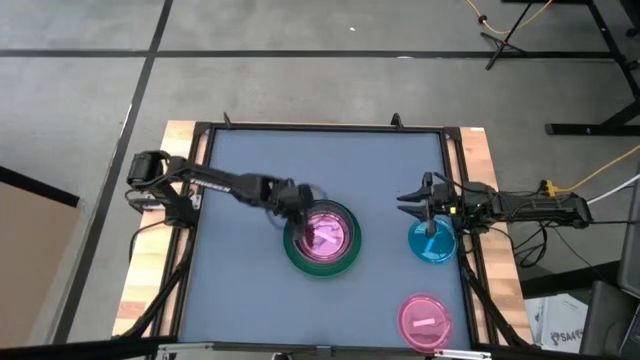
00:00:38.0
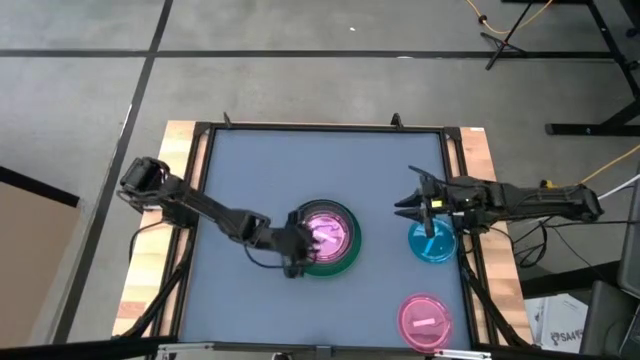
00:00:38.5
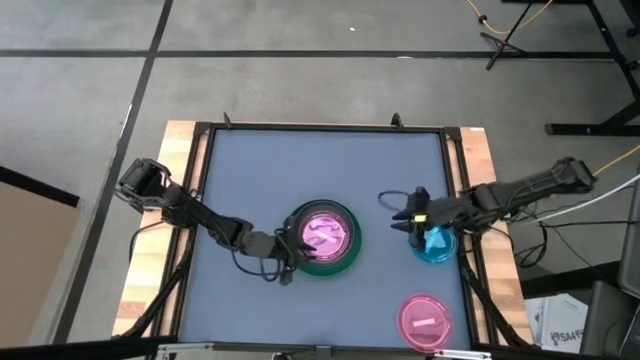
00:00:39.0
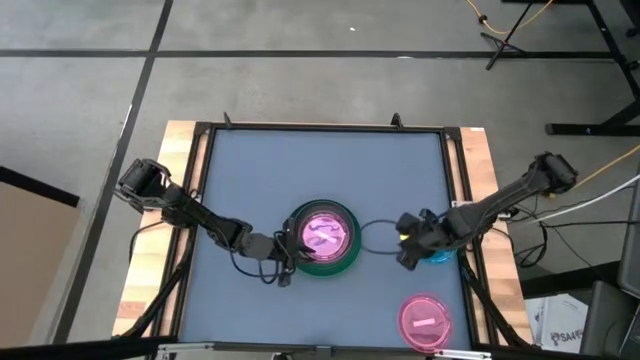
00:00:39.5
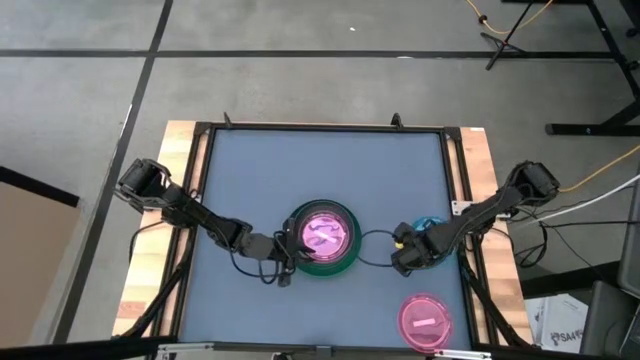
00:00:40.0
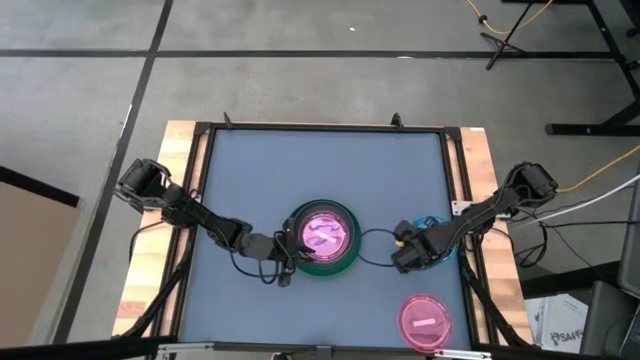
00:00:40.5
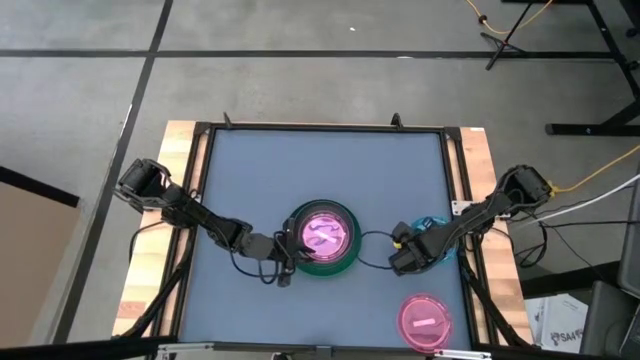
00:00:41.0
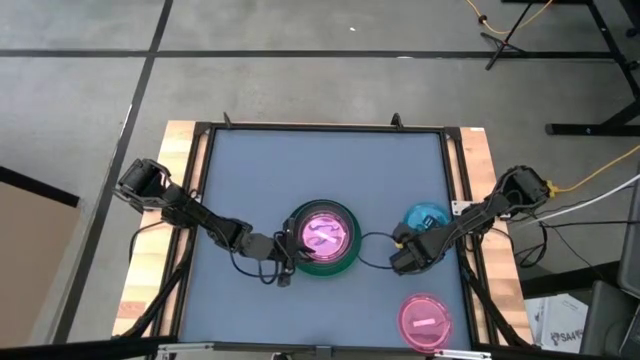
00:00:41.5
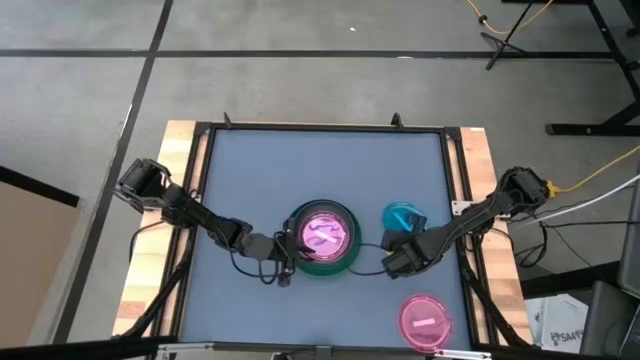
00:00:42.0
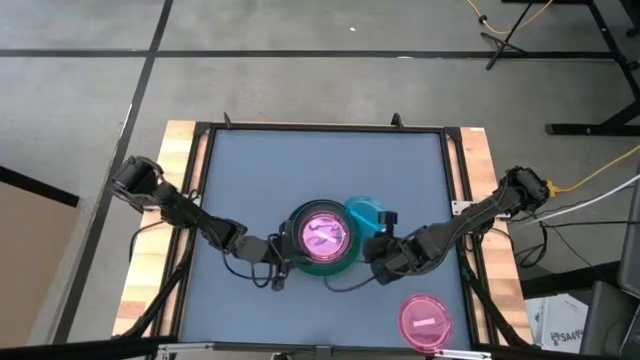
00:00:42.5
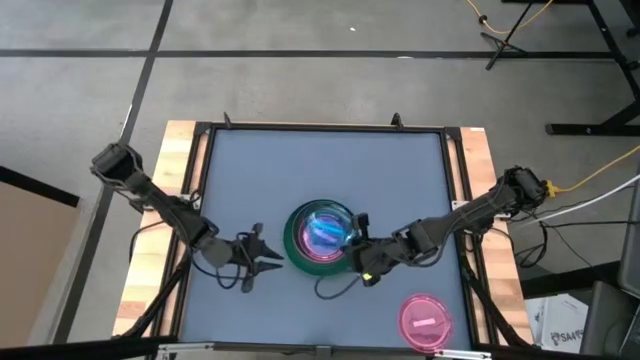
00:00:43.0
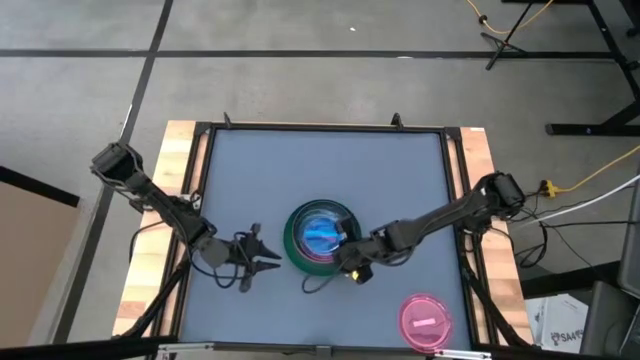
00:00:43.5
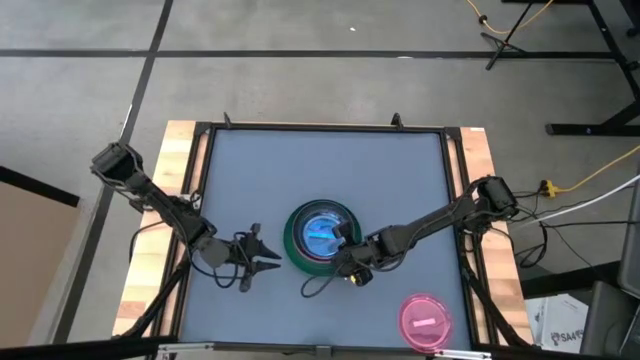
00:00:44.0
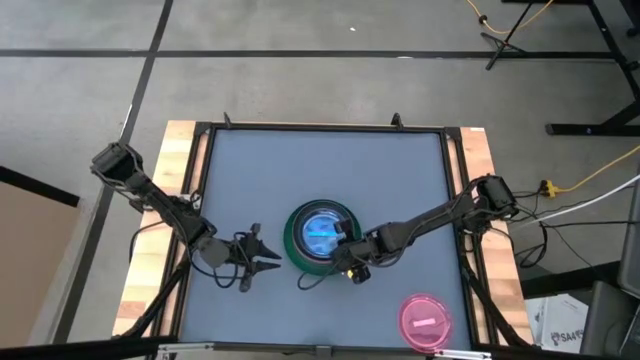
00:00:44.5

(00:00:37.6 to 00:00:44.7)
Task: Stack plastic plates
Stack the blue plate on top of the light pink plate

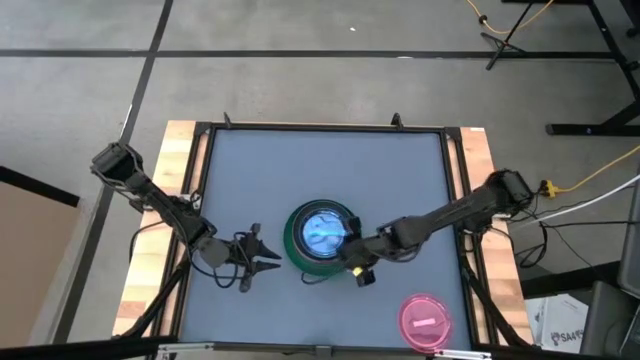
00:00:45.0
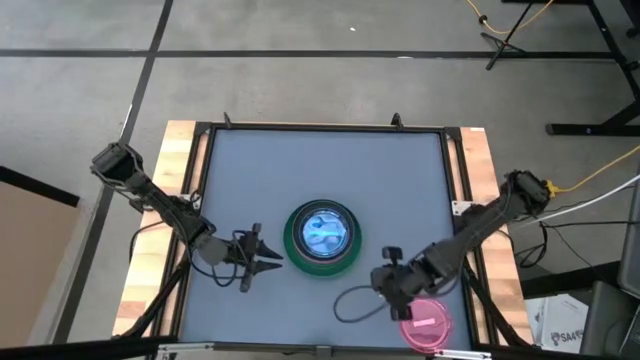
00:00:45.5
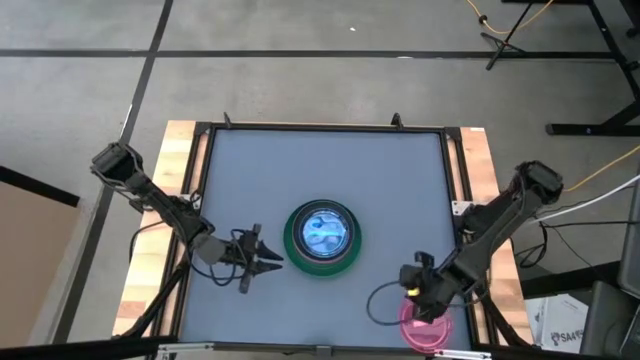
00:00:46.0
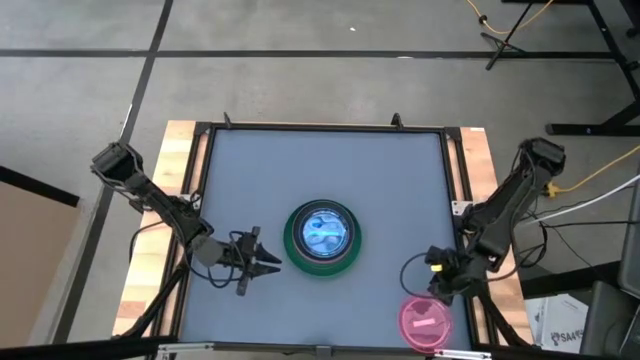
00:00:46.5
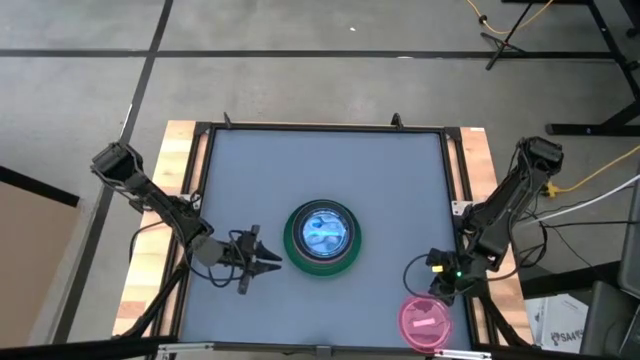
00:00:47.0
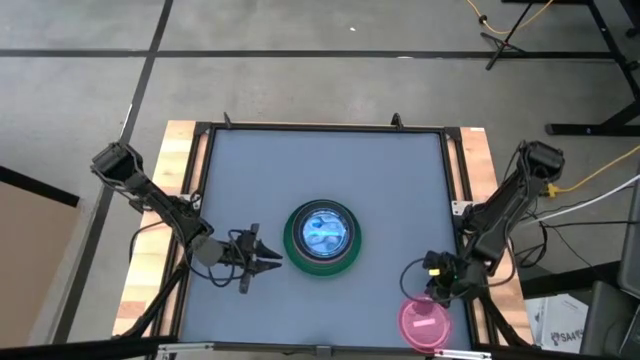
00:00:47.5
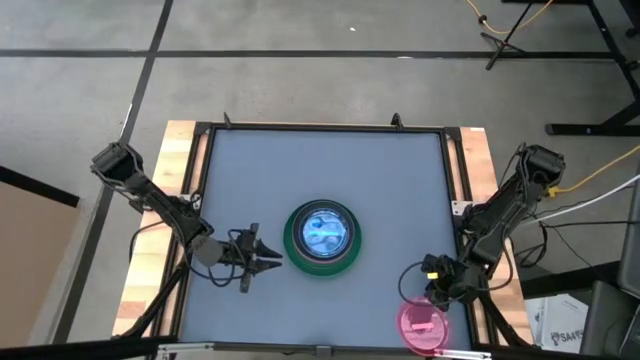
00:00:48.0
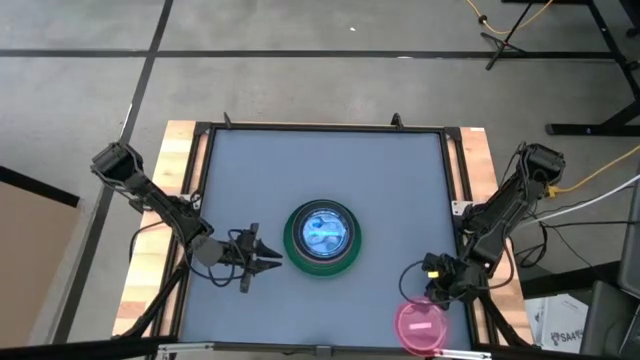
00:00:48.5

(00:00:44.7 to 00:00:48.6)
Stack the light pink plate on top of the blue plate

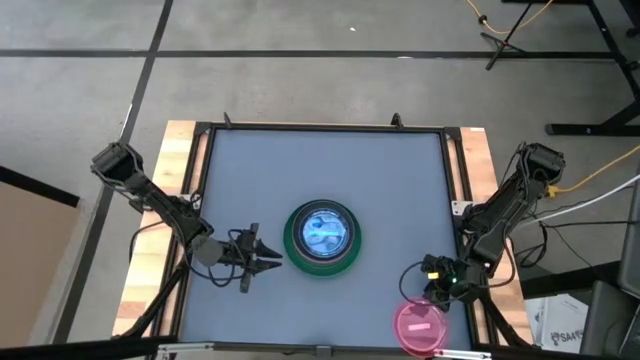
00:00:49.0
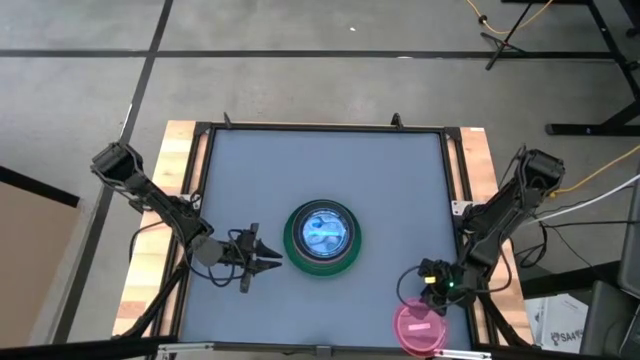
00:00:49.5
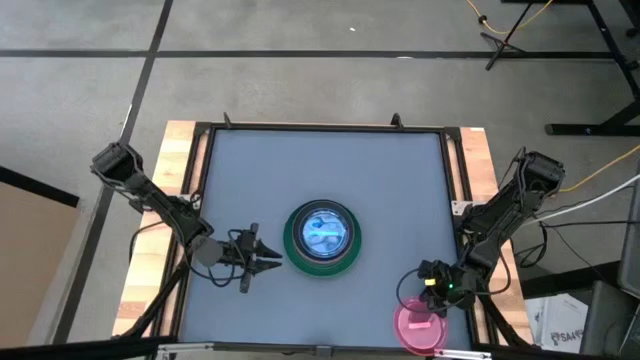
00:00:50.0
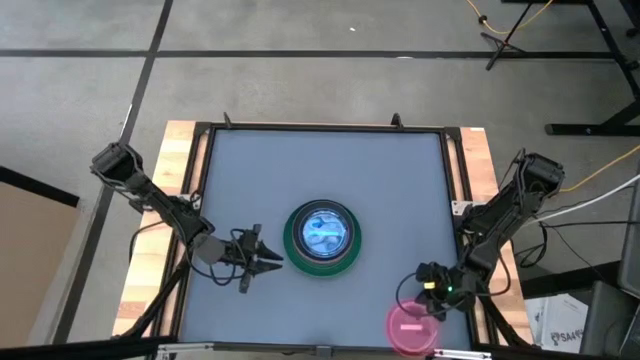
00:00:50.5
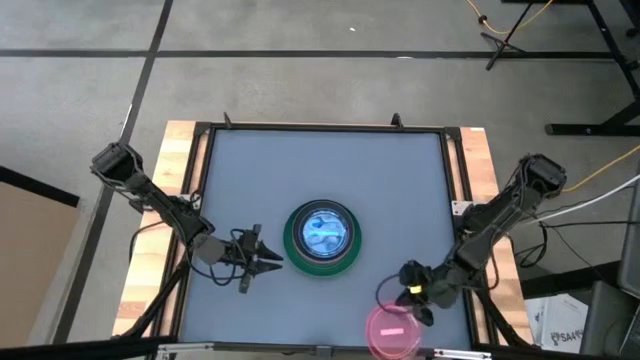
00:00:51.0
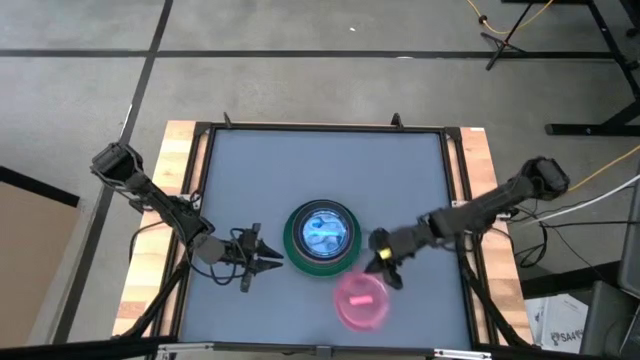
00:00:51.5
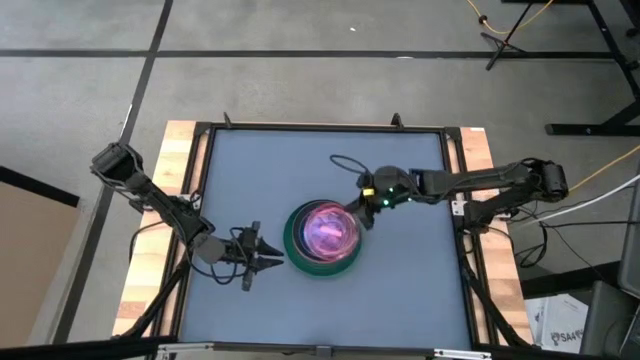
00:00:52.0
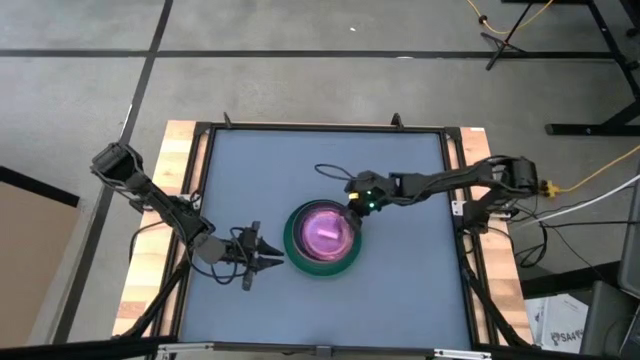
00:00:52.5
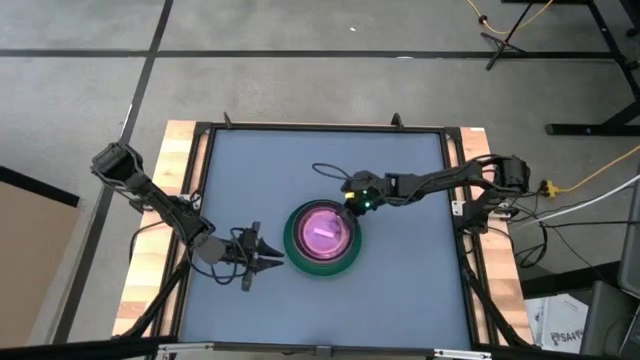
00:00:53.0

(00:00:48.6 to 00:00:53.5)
Stack the light pink plate on top of the blue plate

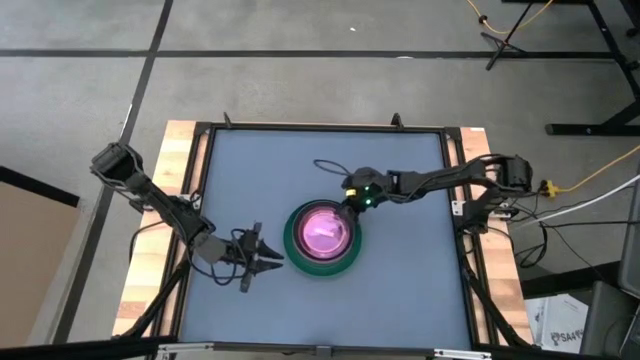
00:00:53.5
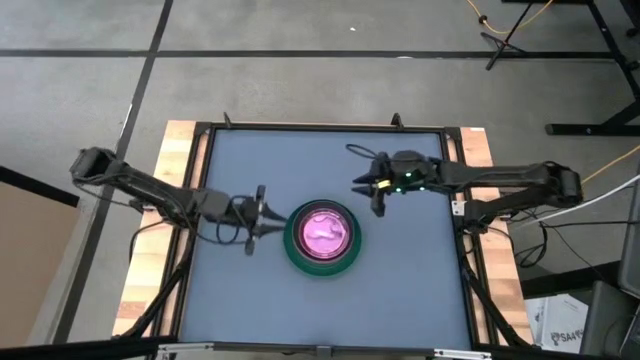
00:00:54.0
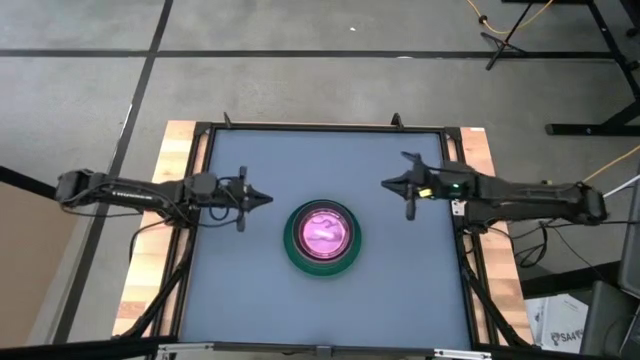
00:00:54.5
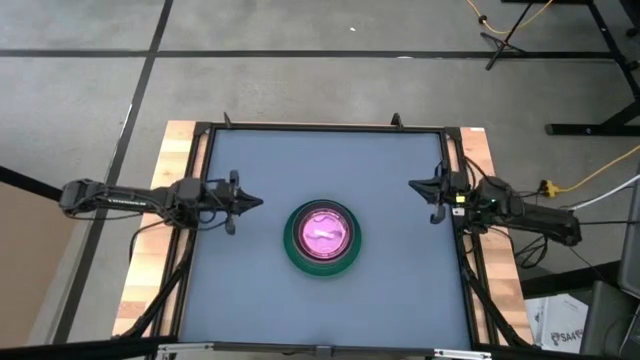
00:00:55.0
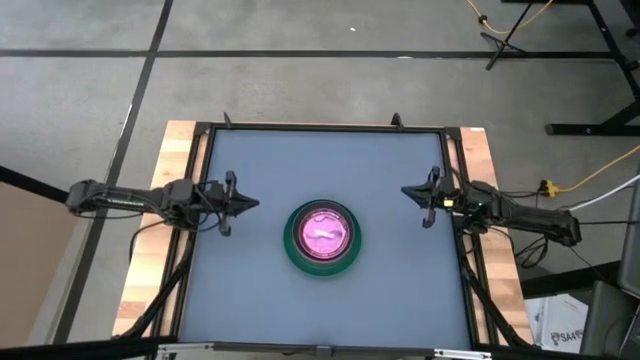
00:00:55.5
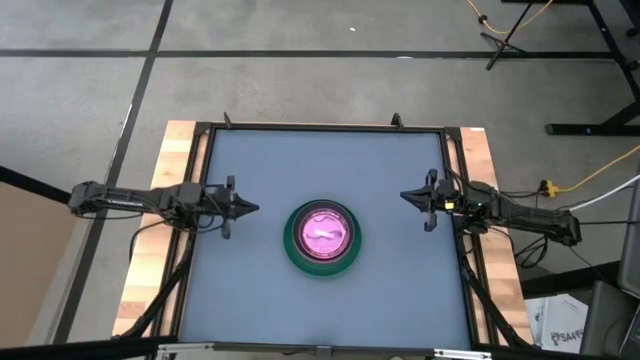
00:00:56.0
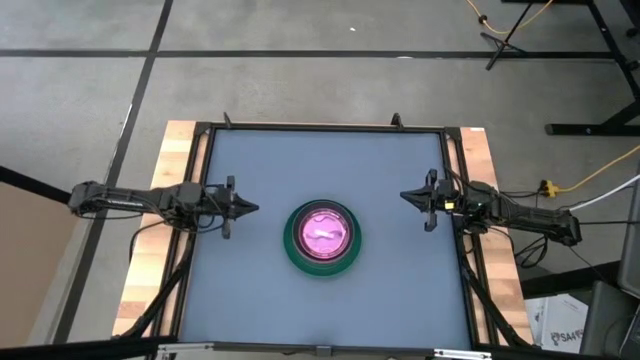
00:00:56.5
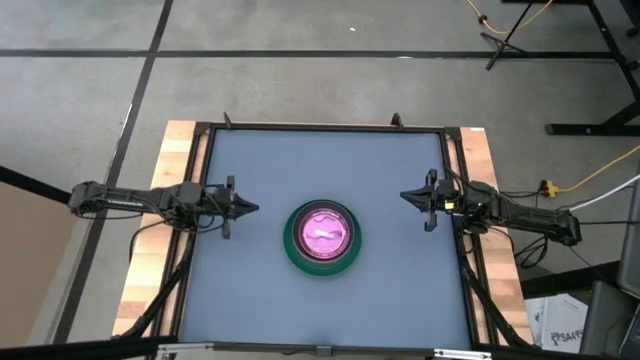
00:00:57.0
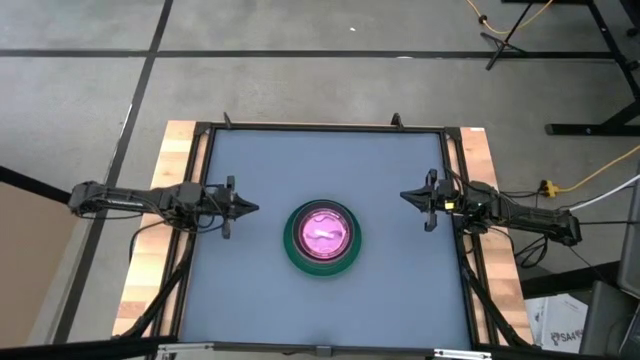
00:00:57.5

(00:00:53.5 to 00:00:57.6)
Return to Home Position
